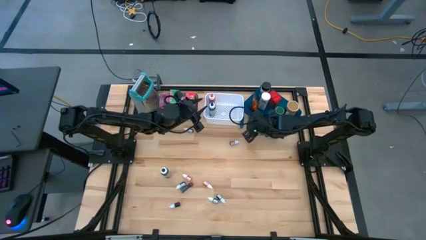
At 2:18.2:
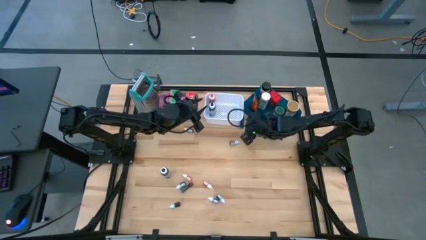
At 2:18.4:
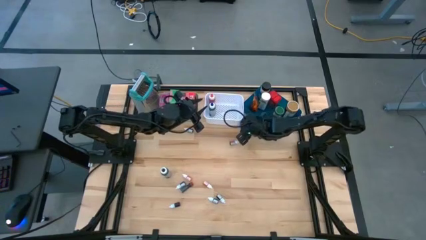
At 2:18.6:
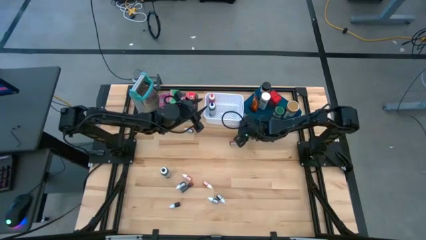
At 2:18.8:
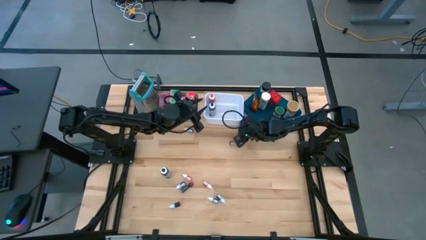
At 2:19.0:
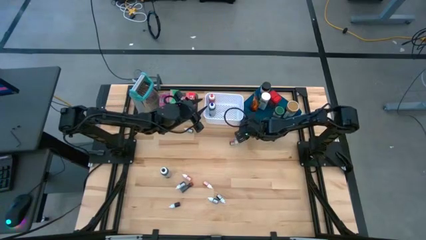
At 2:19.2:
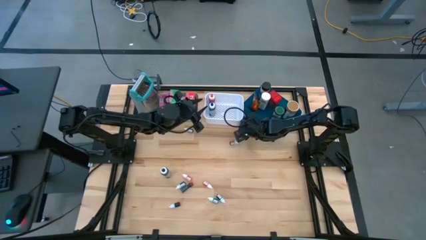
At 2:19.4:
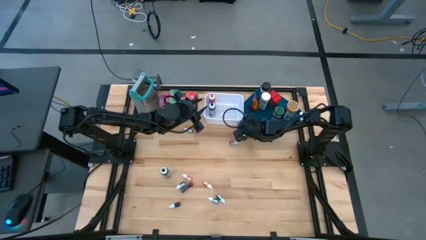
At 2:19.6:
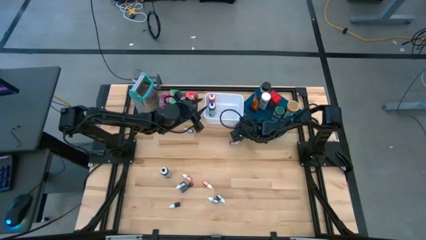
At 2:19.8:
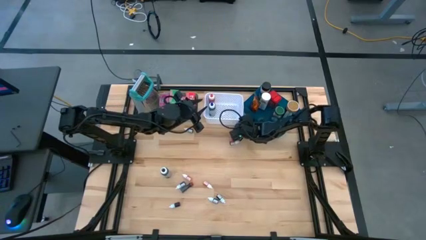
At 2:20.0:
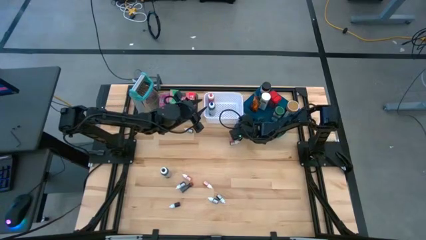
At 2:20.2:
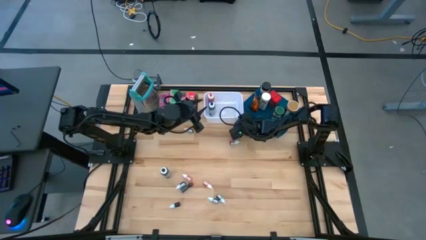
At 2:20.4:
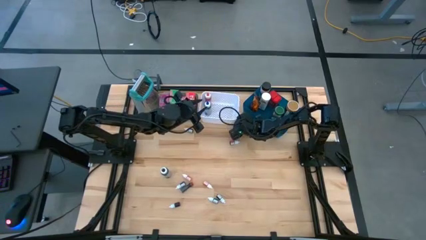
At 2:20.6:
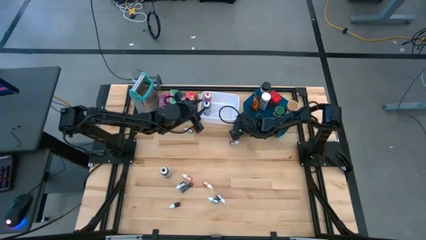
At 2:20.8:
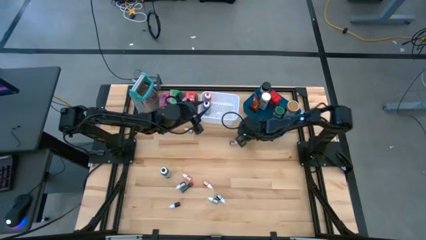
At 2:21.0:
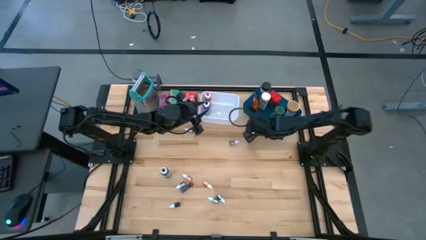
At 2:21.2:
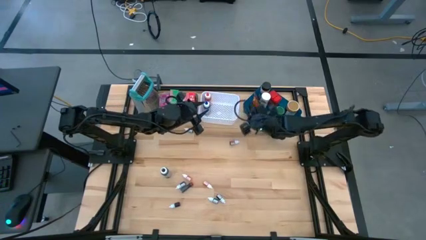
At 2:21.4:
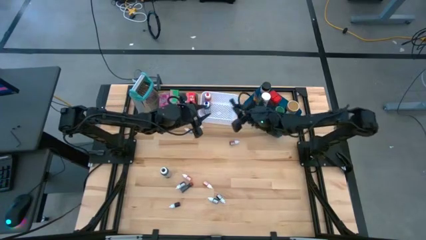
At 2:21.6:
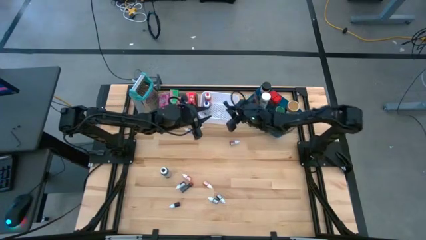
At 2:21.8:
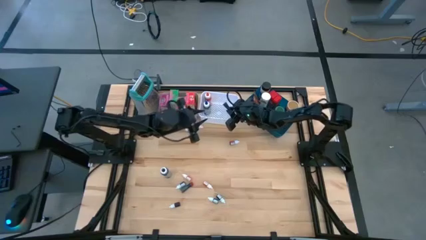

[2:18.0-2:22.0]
Task: Pick & Place Kitchen Items
Put the medium blue food coloring bottle into the white bin

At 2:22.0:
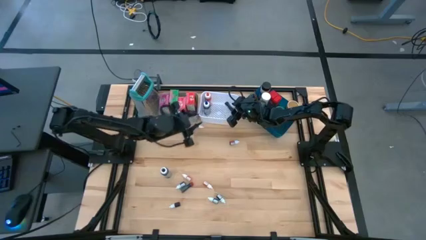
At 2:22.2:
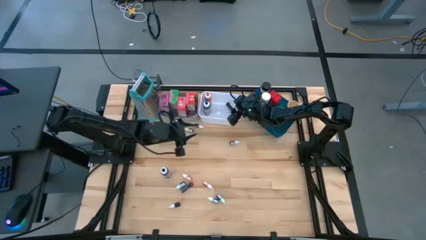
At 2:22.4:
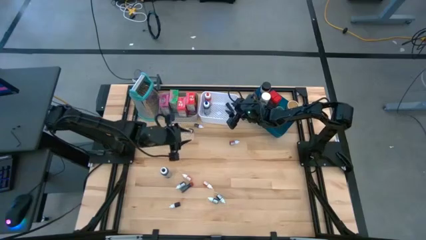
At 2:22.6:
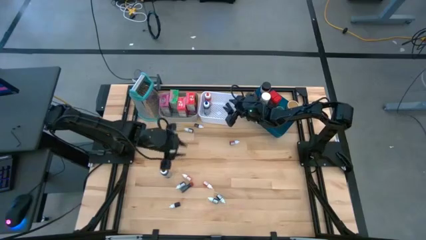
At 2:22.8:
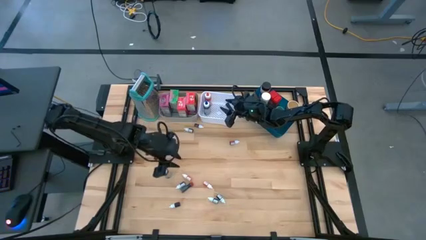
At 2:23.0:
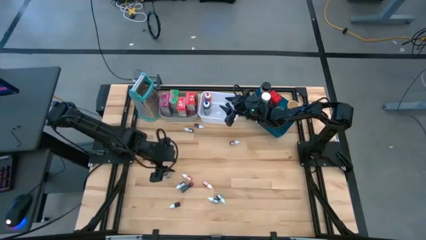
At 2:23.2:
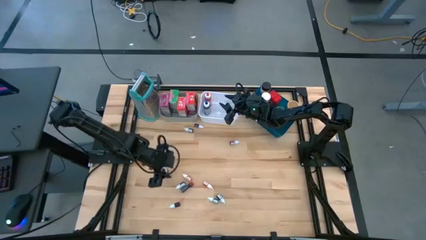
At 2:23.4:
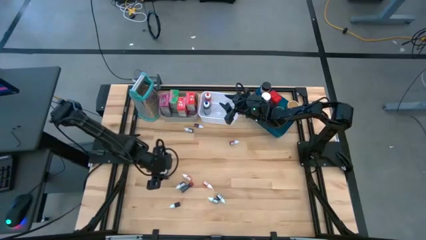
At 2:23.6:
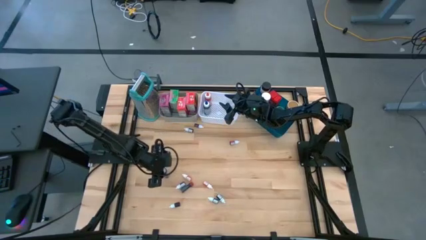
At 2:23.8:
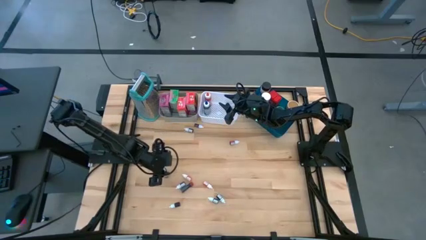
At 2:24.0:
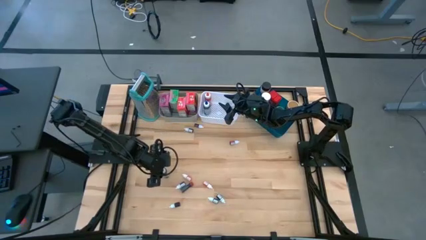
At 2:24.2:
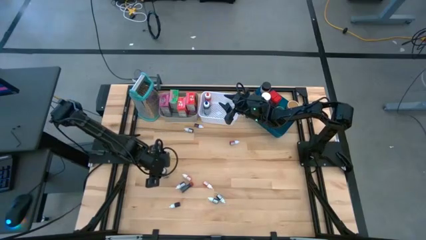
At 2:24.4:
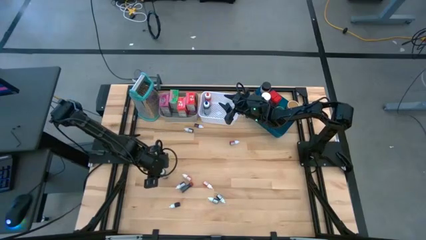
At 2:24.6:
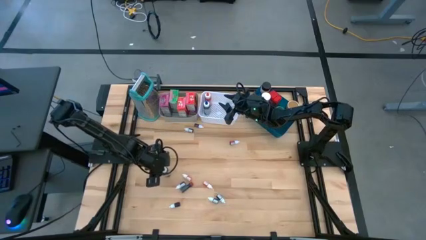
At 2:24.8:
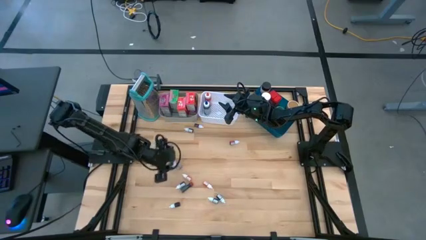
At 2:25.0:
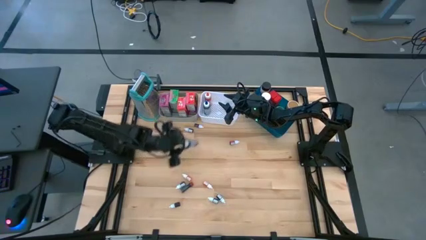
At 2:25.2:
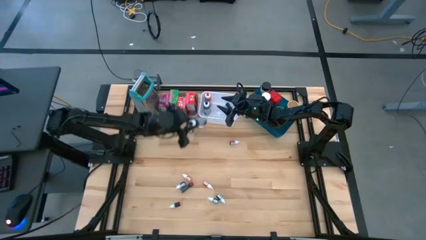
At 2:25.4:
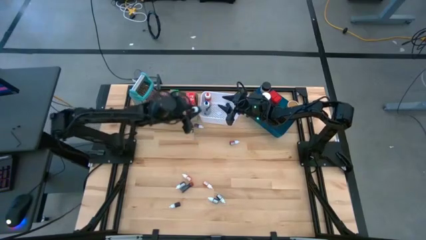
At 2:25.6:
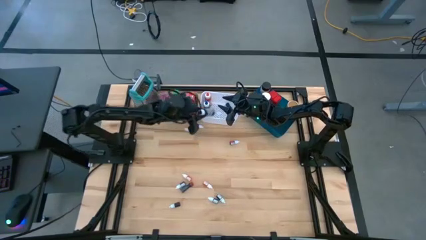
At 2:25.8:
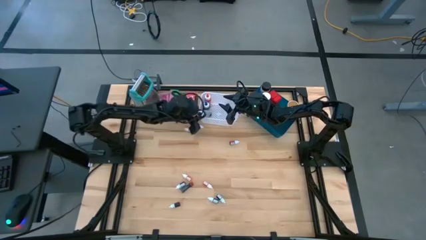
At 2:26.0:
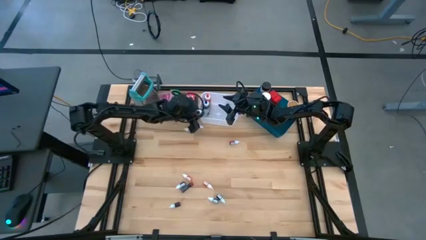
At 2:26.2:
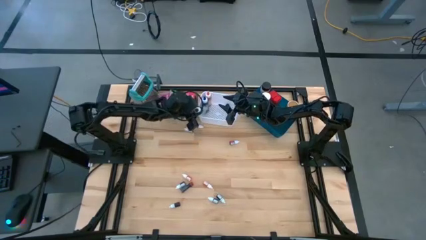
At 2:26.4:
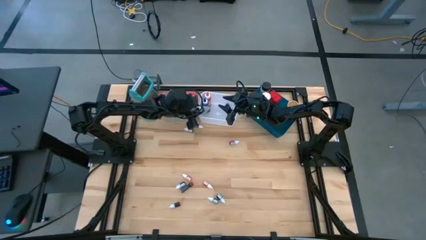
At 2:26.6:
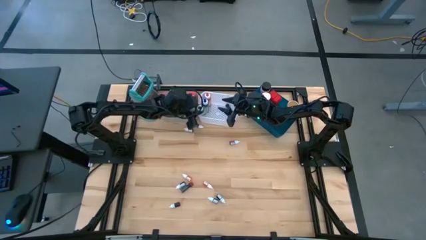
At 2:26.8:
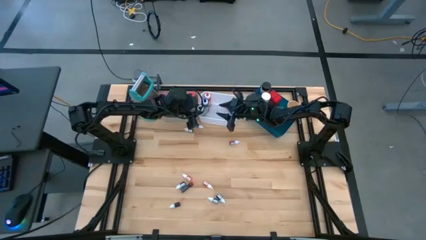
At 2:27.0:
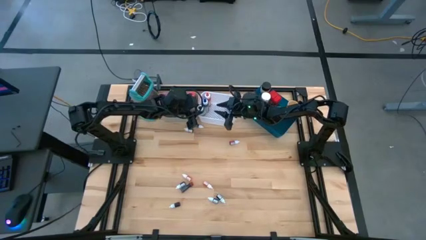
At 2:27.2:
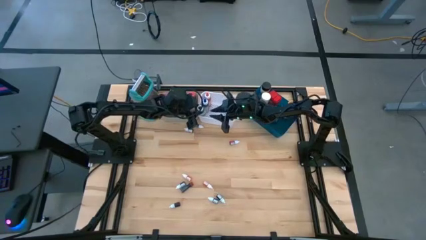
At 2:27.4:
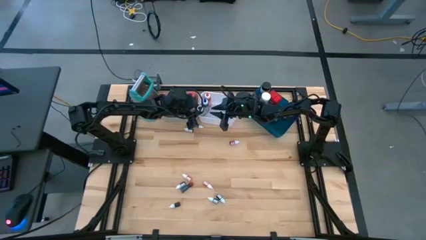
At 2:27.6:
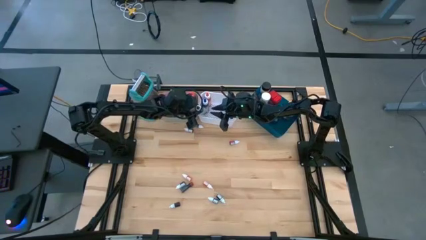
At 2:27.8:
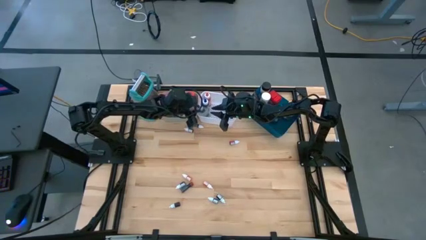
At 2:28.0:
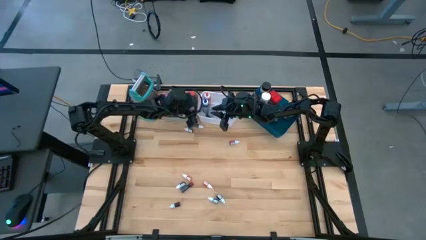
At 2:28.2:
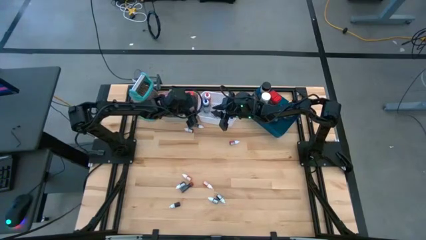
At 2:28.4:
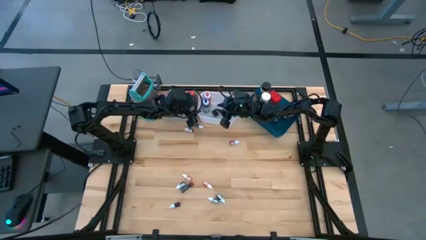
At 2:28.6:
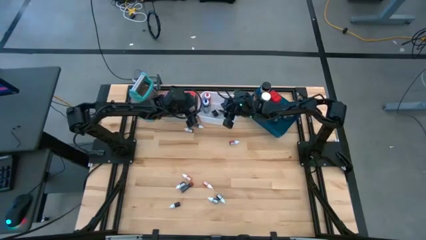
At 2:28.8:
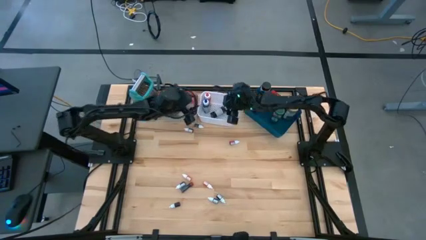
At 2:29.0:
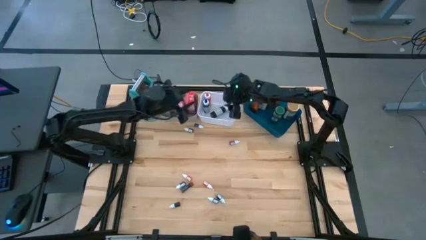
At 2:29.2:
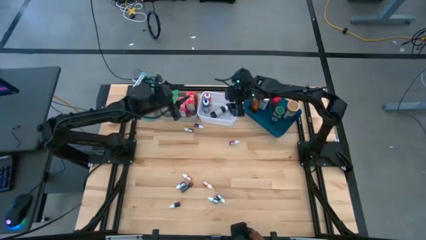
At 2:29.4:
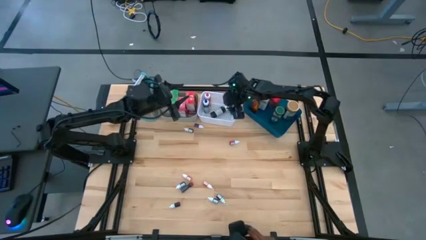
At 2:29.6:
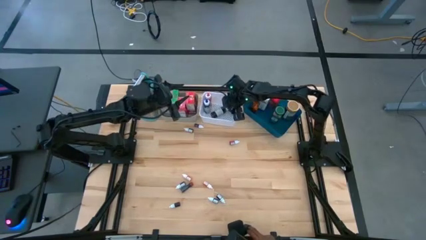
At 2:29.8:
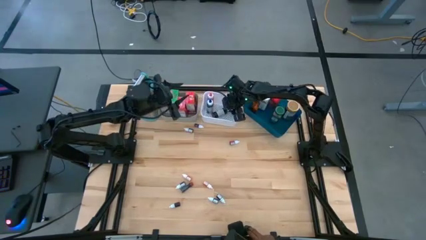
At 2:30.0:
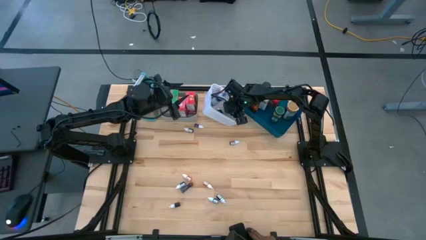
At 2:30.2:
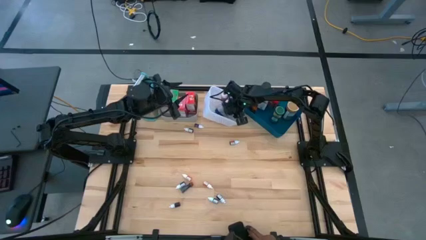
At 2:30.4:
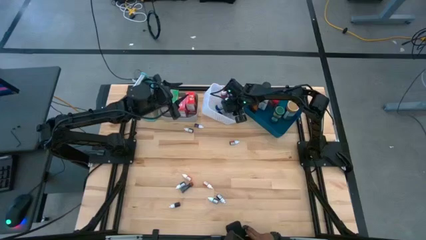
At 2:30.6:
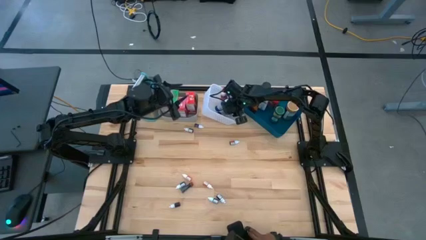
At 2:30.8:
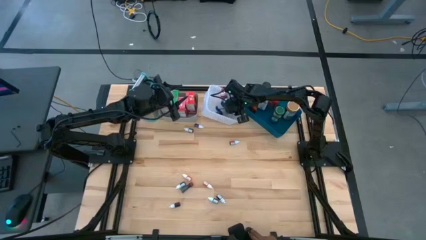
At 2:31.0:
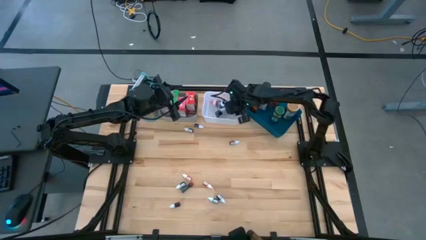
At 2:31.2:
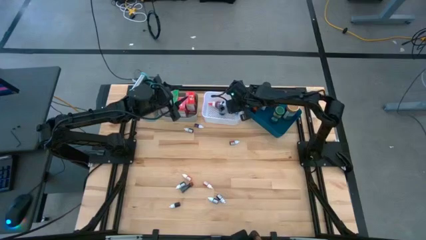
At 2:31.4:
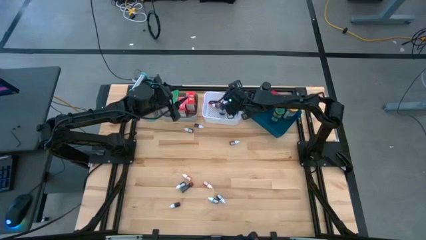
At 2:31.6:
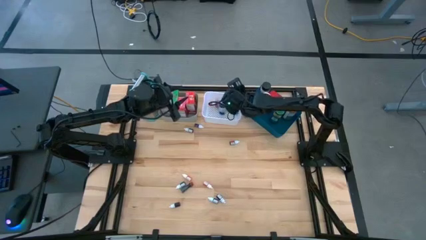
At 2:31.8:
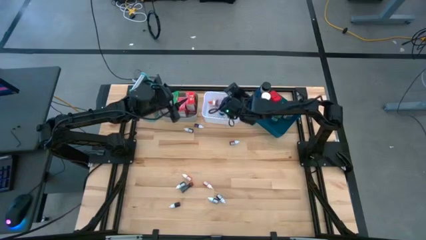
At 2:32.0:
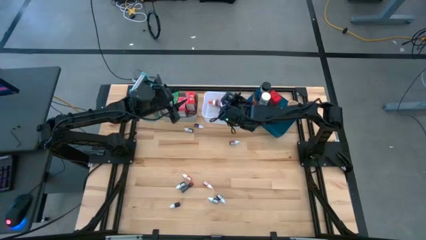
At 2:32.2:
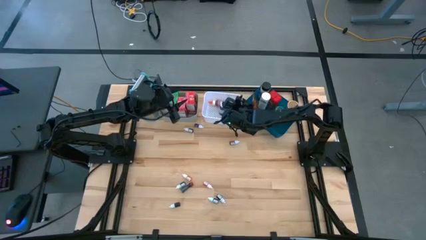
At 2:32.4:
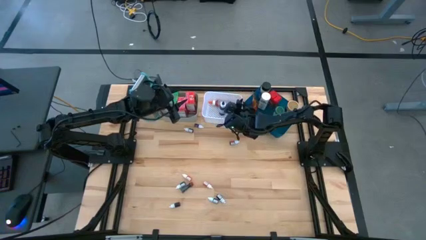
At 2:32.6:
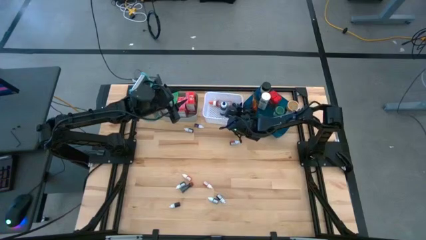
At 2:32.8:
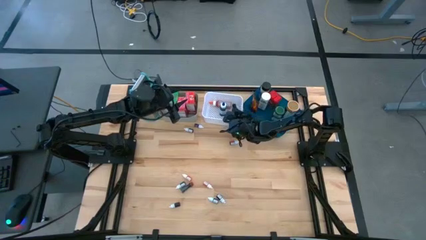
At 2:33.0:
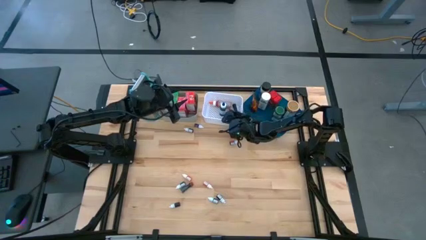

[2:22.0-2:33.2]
Put the large black food coloring bottle into the white bin

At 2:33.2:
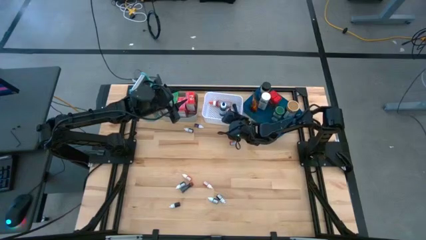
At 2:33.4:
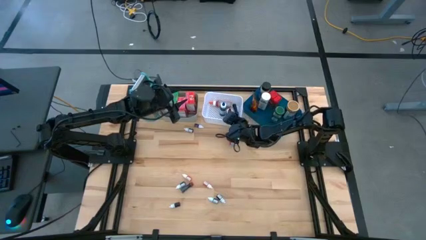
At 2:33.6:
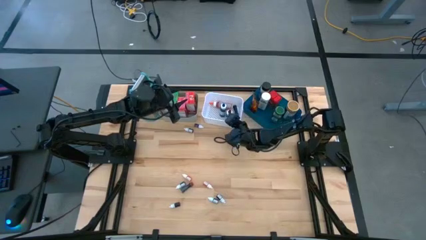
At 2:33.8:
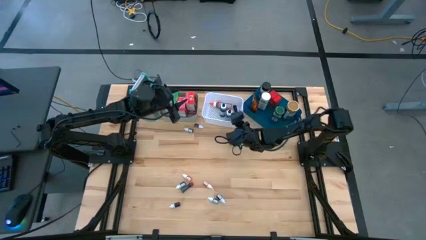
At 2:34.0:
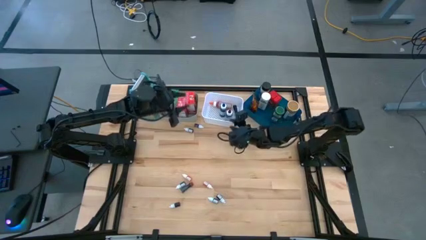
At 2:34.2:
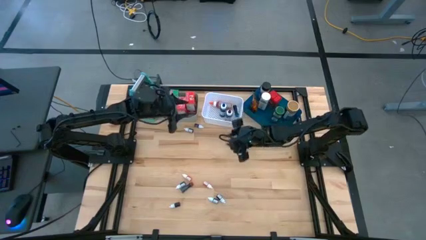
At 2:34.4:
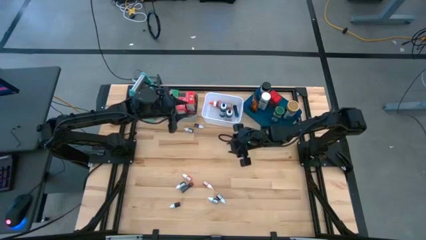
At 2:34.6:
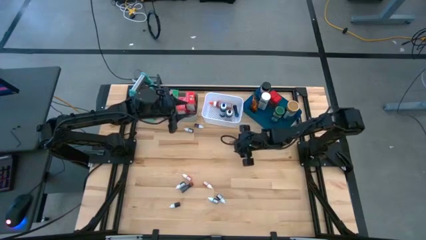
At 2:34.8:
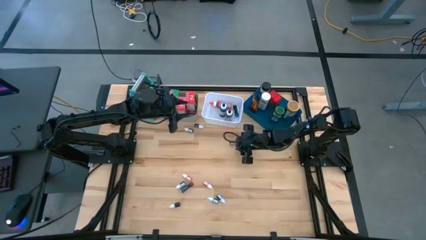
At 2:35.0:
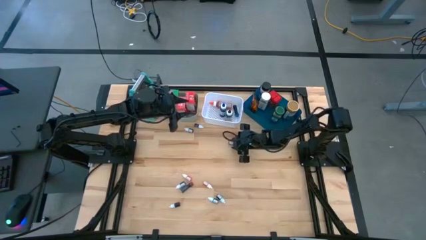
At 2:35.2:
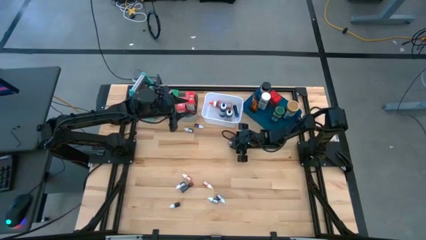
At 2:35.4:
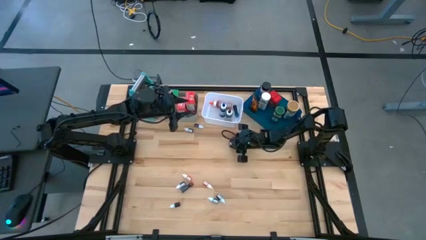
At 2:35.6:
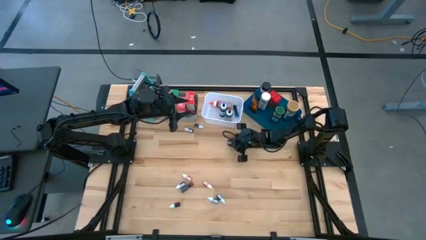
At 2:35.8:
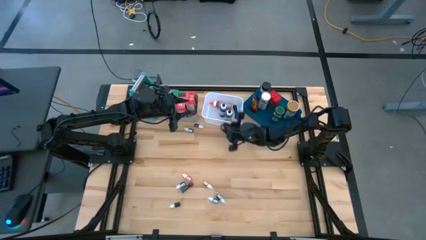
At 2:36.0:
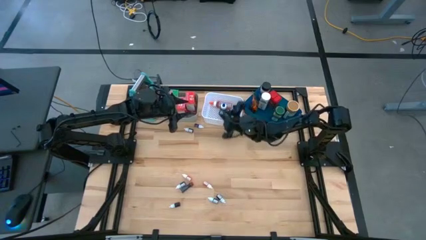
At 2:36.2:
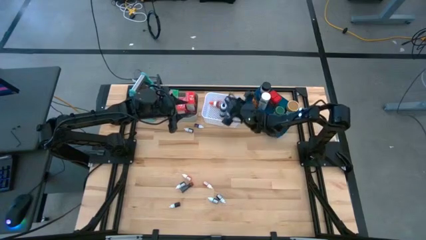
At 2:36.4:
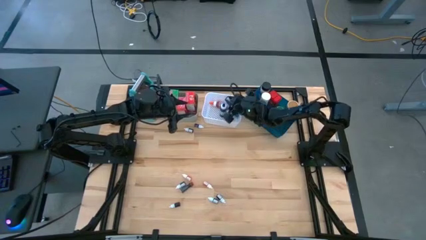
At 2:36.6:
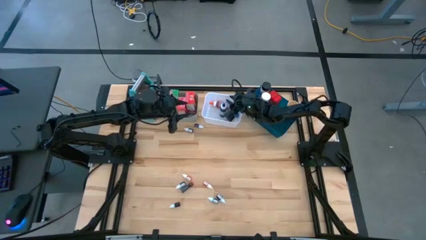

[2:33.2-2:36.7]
Put the small pink food coloring bottle into the white bin
